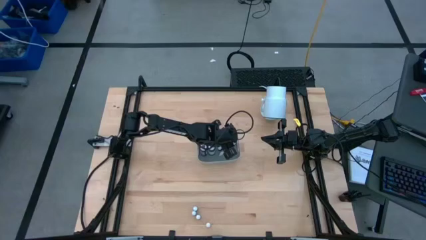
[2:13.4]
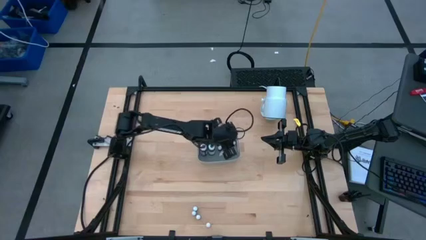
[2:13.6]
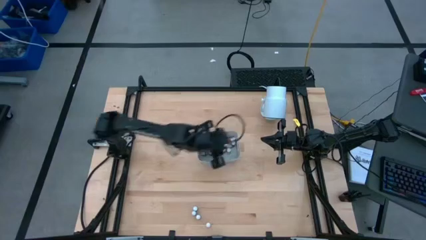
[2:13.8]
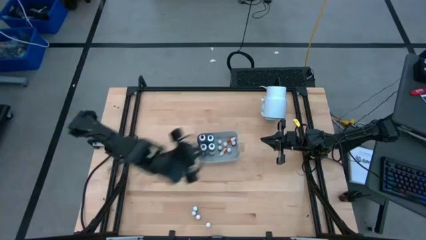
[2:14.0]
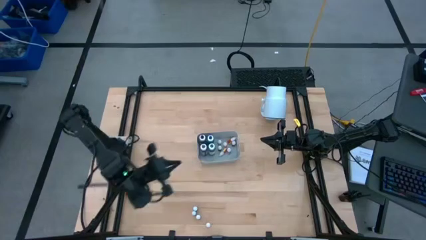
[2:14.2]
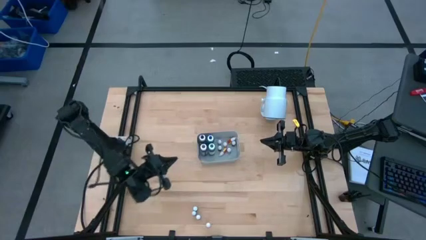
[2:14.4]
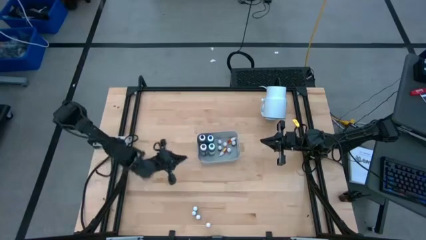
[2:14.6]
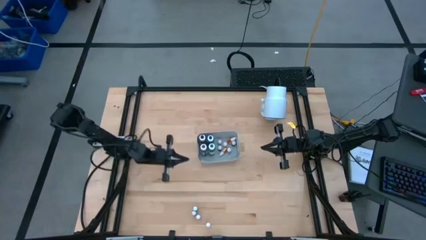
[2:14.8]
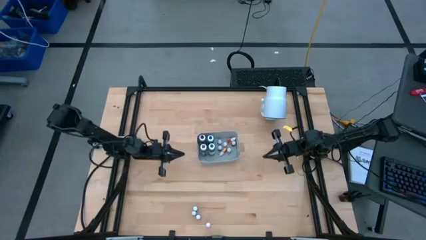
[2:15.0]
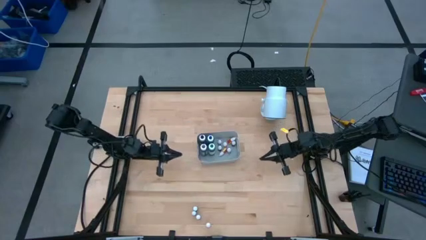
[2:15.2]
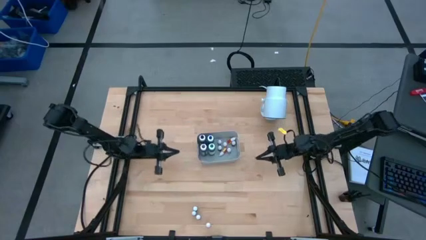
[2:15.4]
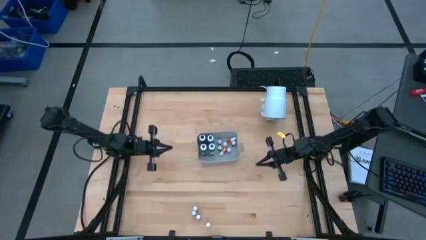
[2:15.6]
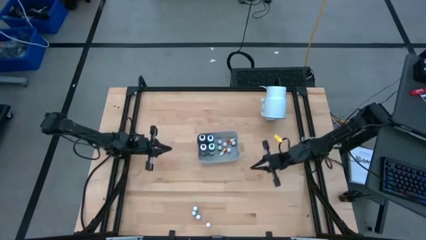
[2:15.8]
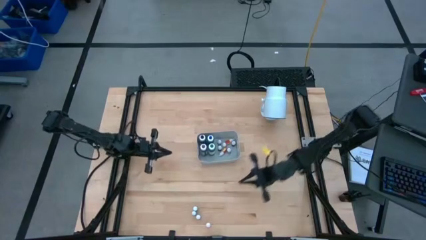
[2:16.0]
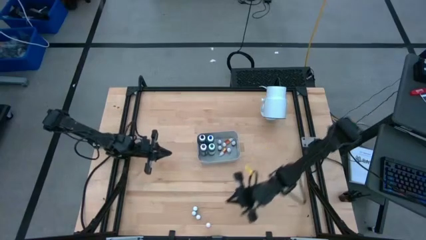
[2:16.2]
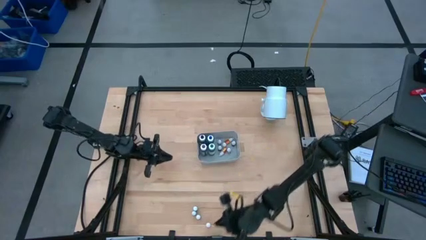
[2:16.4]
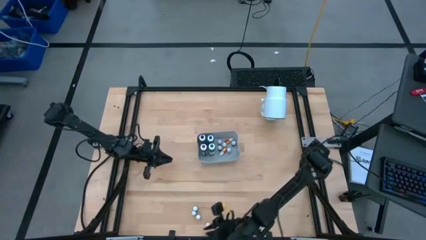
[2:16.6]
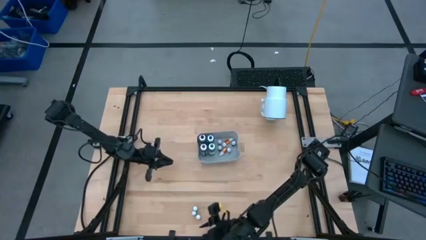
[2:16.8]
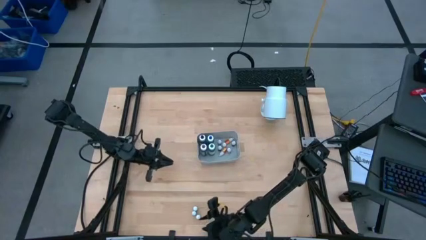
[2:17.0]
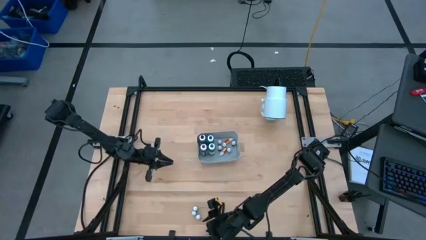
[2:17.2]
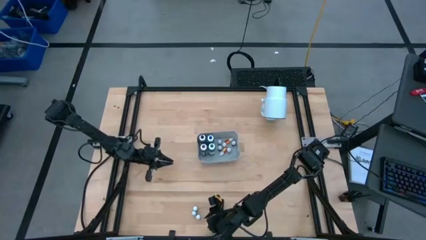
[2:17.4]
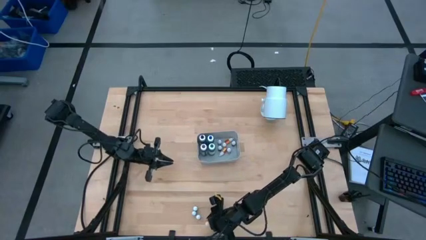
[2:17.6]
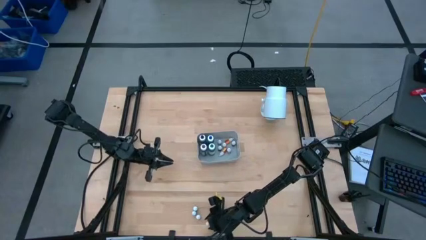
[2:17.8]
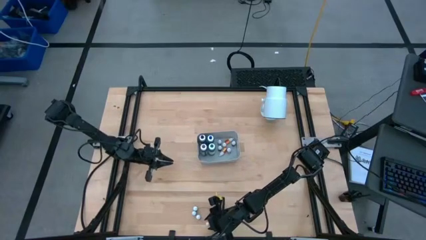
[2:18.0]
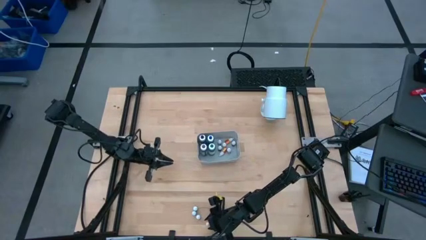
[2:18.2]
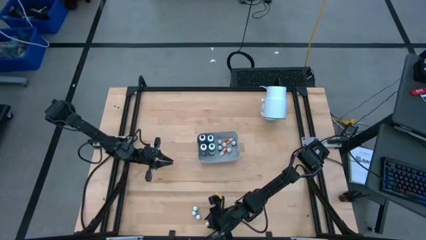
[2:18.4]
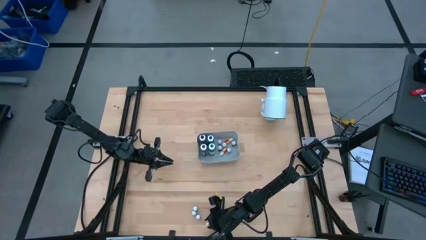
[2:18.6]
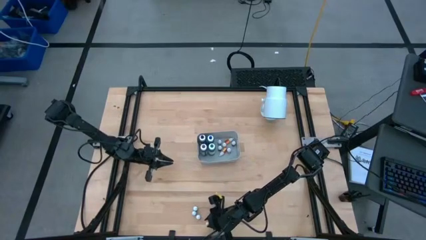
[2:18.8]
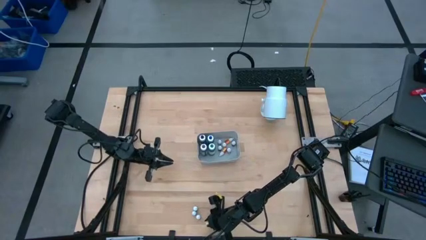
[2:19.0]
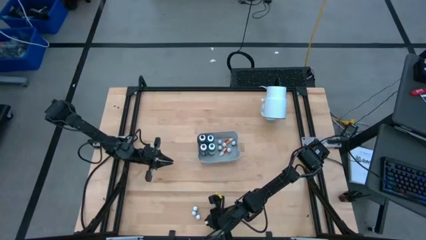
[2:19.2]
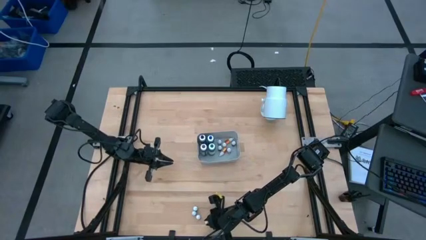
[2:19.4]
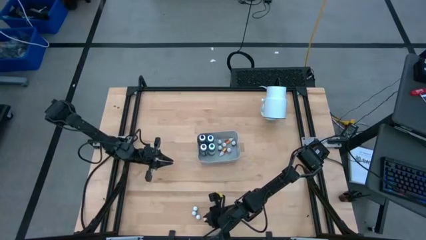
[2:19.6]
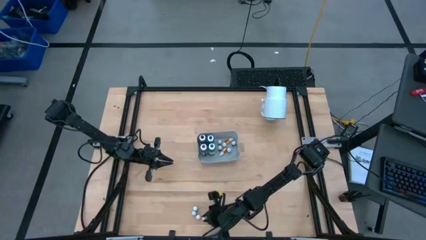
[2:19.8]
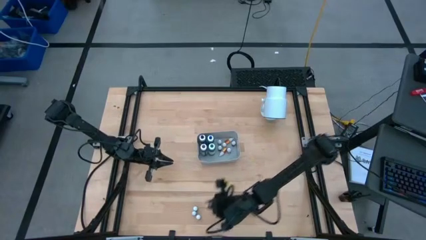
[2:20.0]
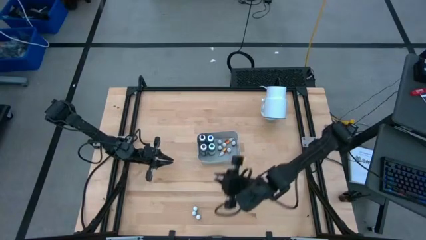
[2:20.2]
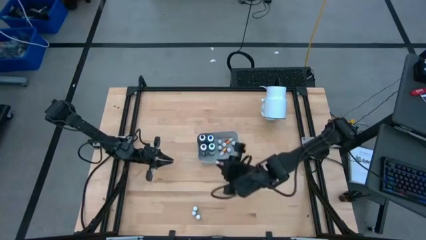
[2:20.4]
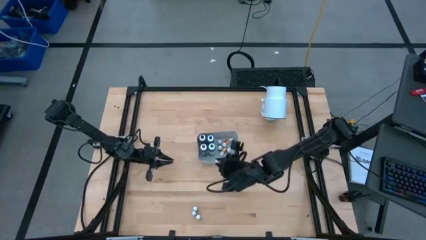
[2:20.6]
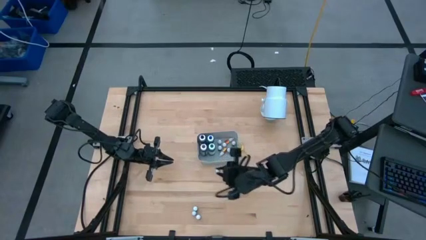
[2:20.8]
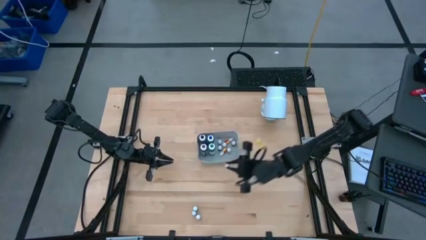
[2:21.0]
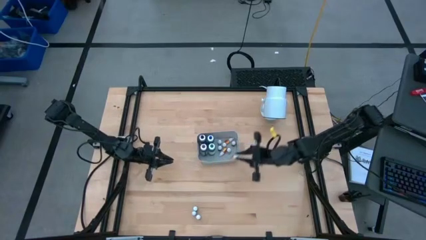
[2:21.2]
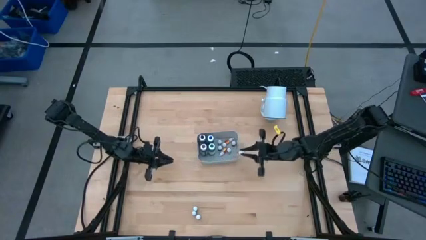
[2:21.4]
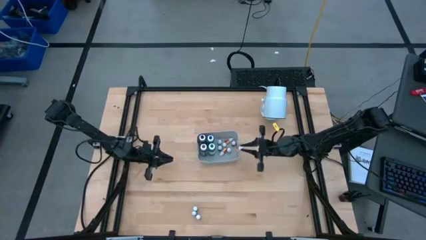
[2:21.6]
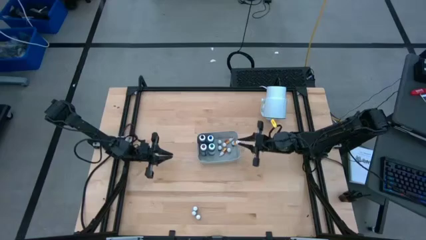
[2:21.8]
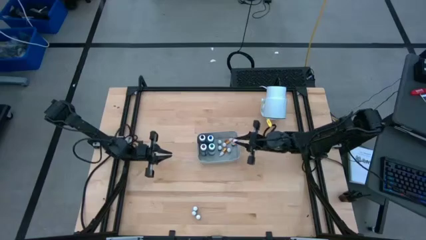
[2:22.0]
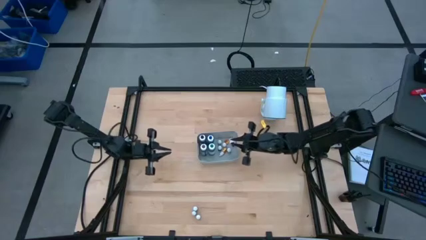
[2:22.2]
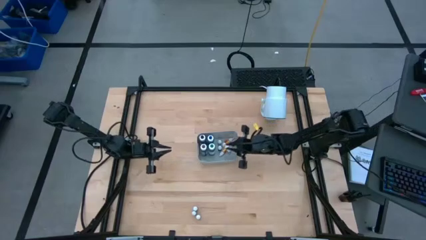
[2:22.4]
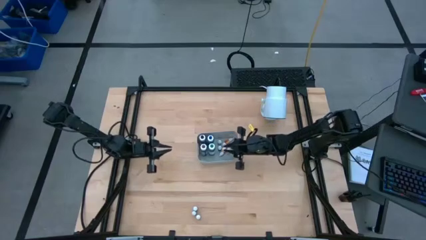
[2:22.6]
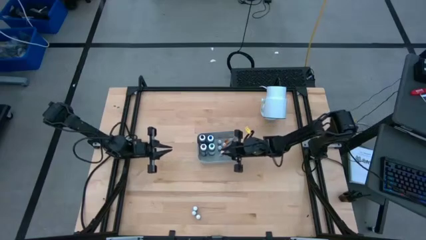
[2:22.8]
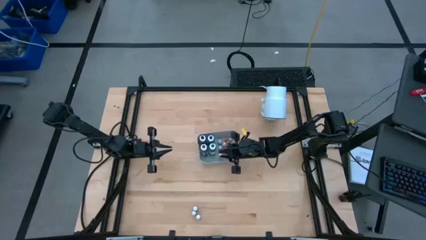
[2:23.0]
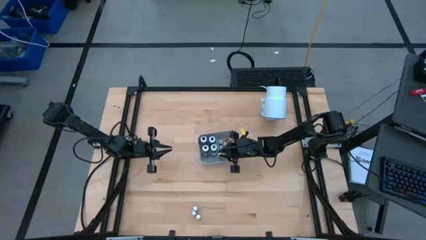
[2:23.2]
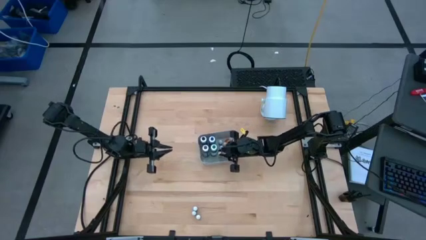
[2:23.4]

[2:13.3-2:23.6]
Task: Pick & Place food coloring
Put the small yellow food coloring bottle into the white bin

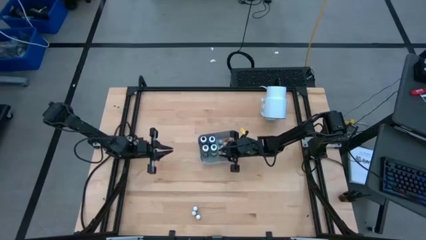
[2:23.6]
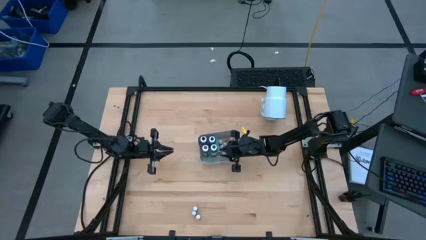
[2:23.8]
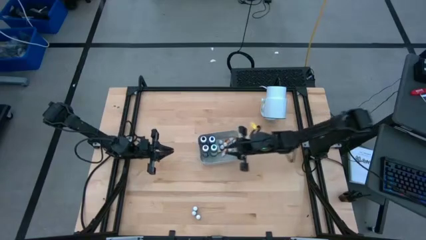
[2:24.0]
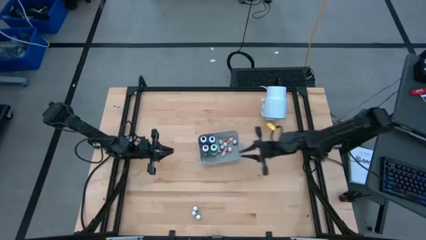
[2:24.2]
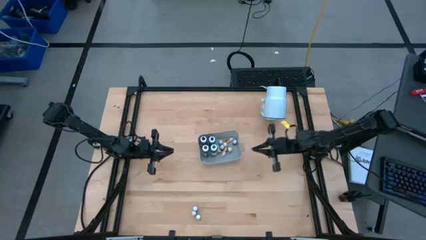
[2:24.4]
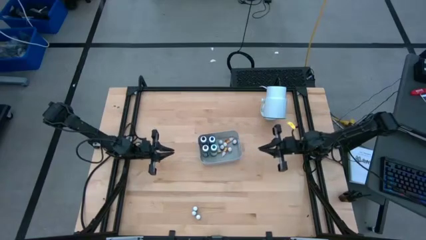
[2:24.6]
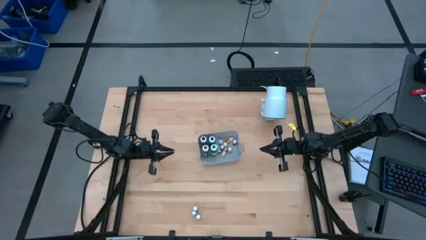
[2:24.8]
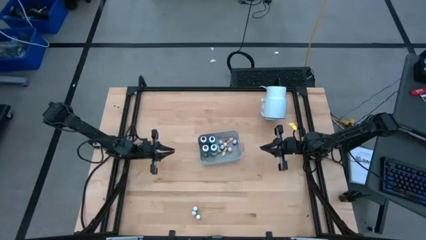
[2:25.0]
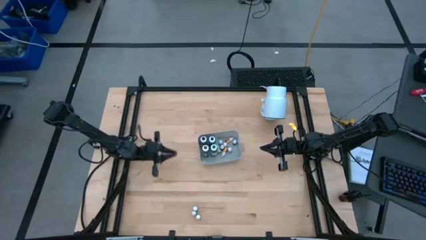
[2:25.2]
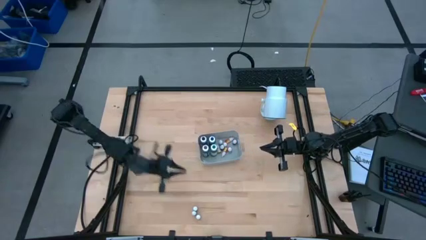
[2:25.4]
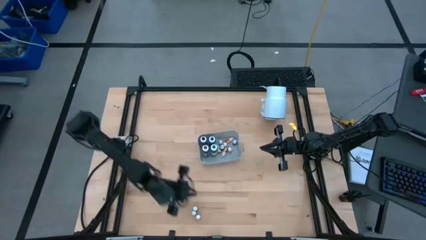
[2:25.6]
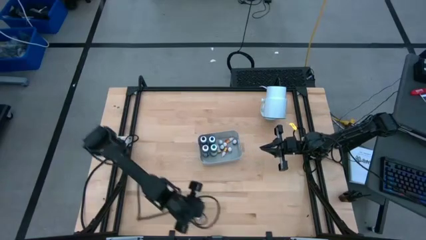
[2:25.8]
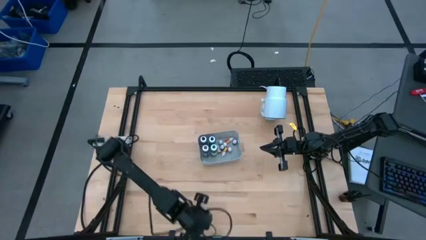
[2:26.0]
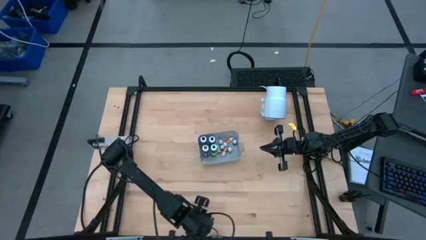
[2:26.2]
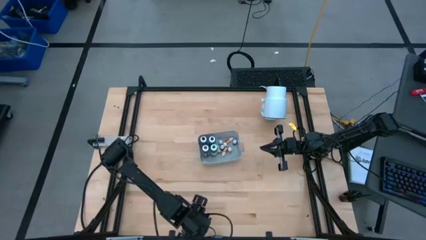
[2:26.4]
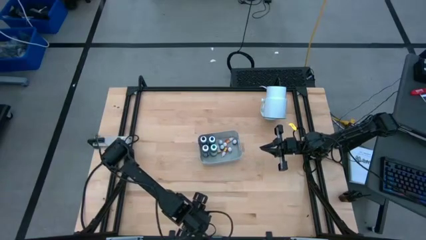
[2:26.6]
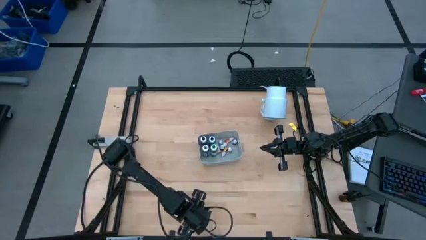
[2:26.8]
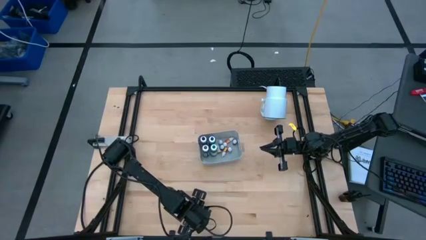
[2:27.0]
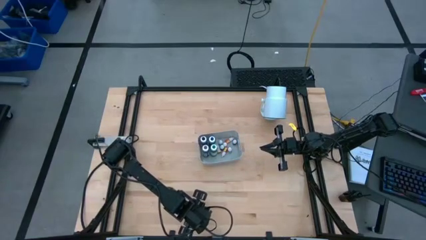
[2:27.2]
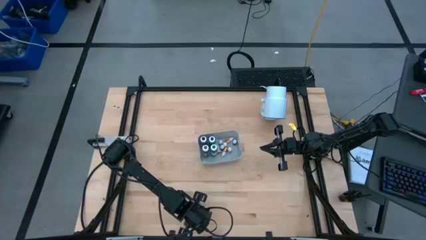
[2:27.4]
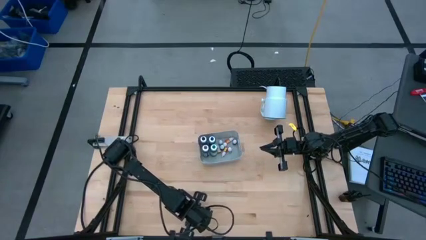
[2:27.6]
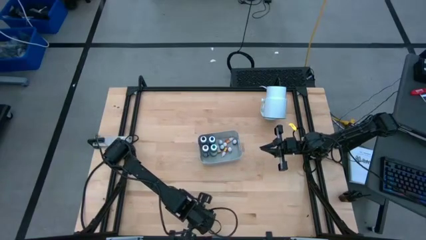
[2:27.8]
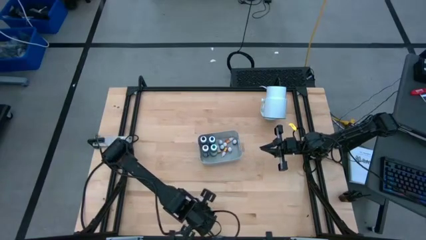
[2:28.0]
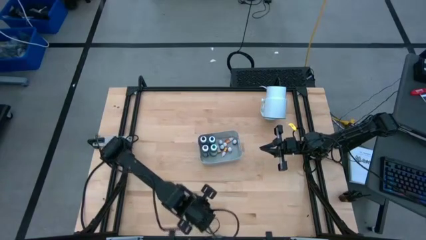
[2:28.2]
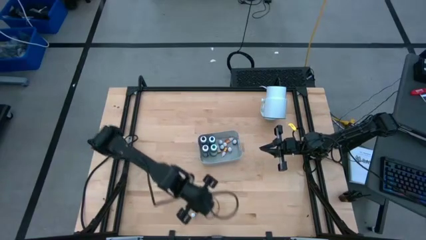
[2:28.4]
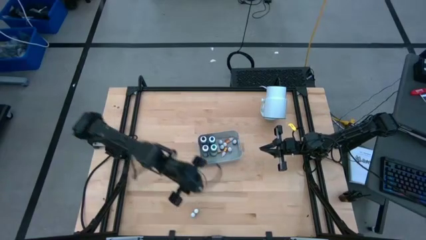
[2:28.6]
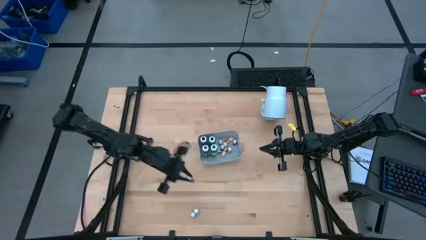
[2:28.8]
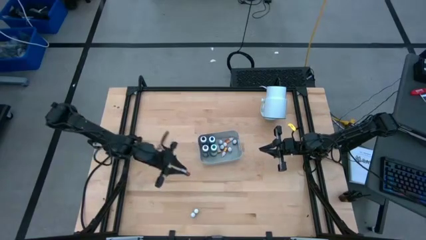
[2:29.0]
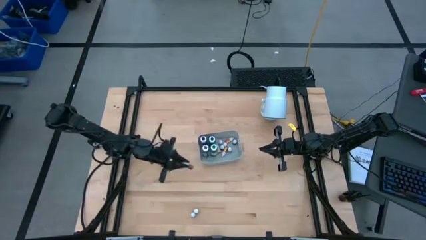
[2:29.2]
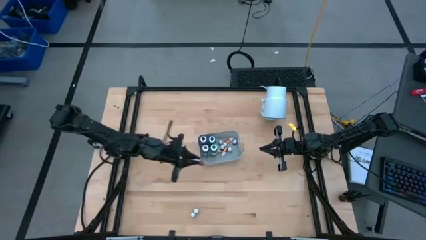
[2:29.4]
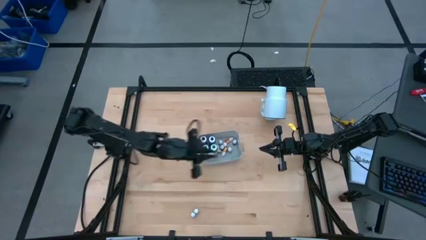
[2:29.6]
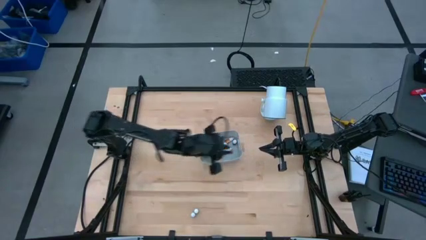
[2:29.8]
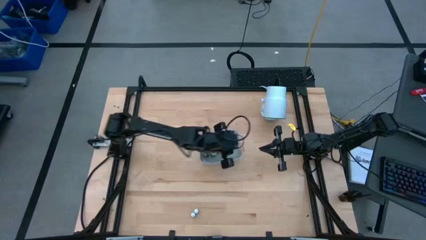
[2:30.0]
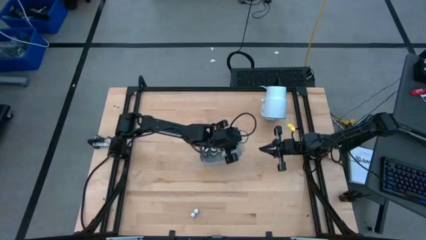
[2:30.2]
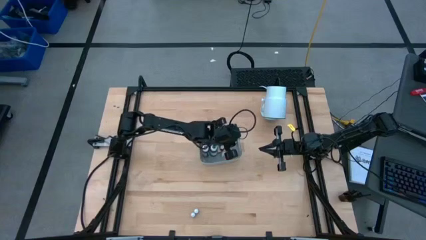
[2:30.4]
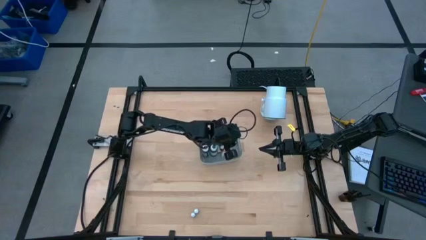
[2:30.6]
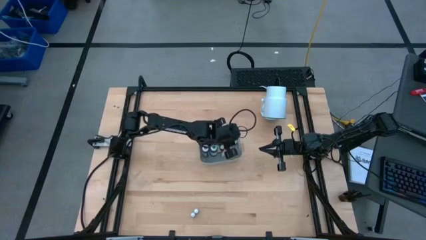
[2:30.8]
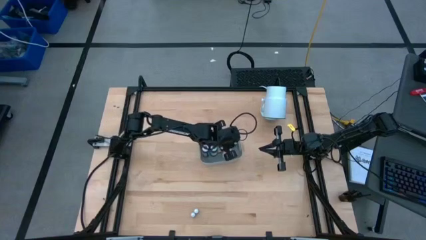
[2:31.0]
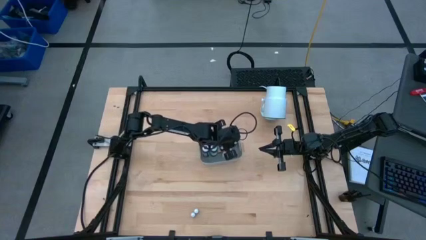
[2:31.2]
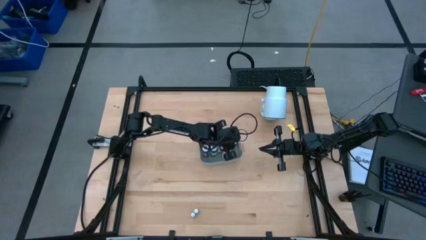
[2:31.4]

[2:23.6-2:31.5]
Put the small red food coloring bottle into the white bin
